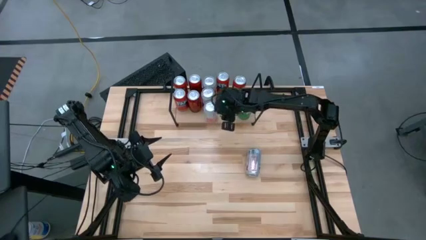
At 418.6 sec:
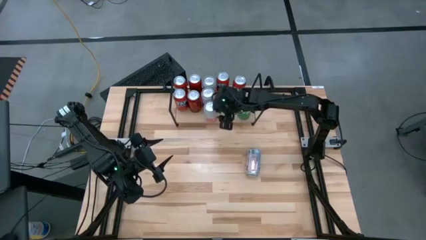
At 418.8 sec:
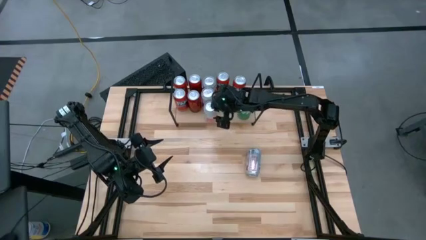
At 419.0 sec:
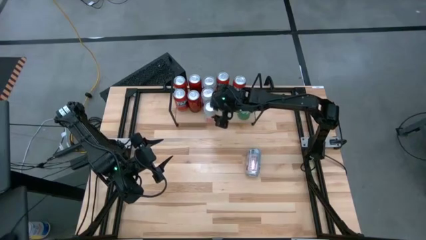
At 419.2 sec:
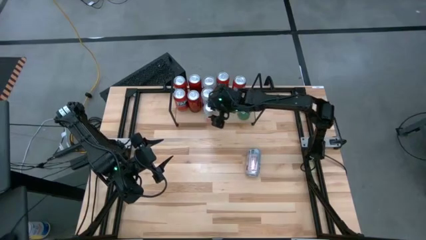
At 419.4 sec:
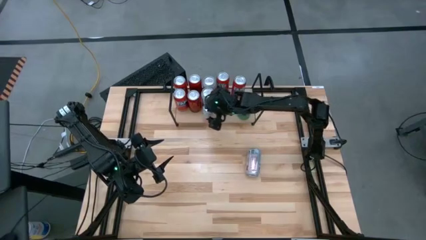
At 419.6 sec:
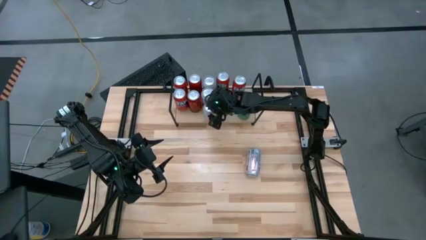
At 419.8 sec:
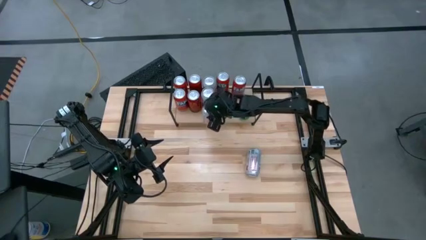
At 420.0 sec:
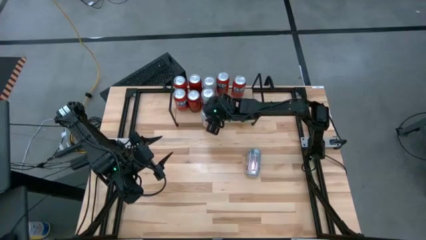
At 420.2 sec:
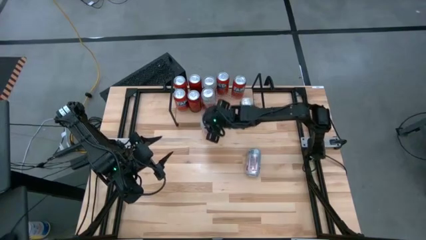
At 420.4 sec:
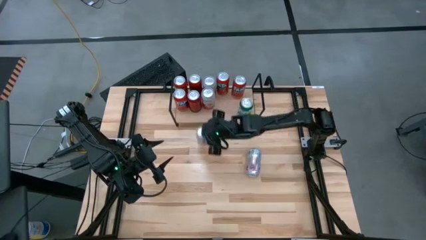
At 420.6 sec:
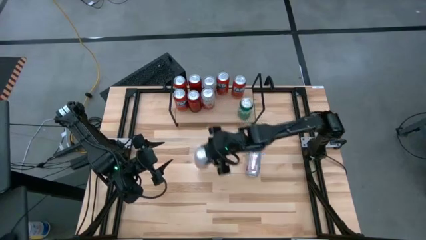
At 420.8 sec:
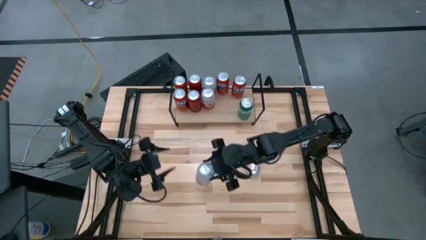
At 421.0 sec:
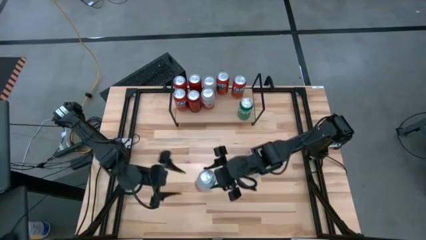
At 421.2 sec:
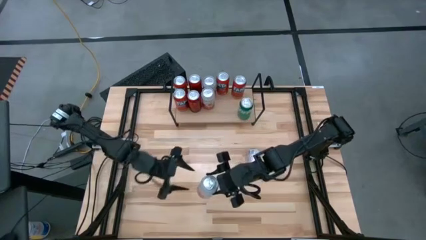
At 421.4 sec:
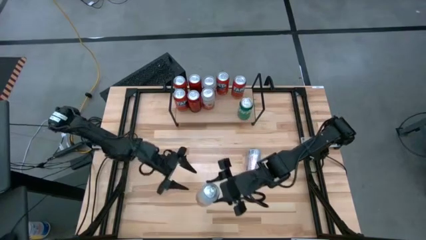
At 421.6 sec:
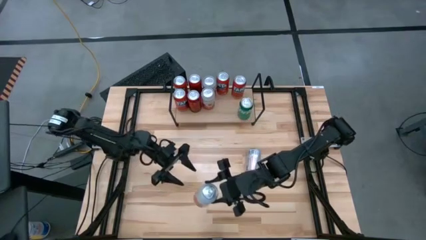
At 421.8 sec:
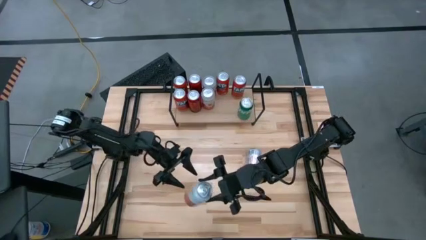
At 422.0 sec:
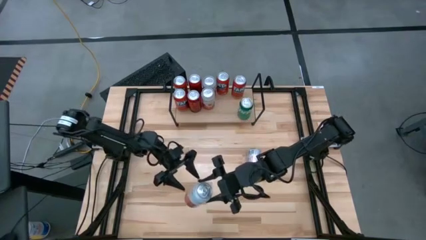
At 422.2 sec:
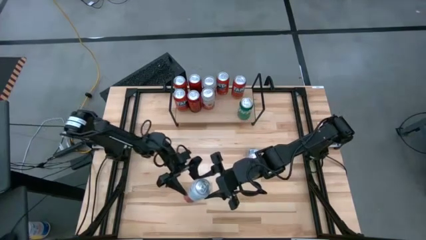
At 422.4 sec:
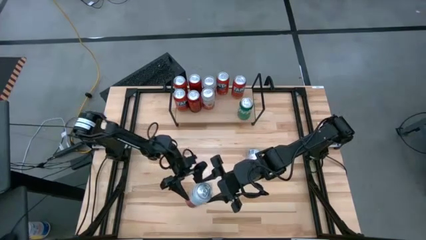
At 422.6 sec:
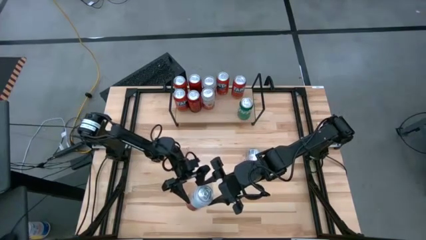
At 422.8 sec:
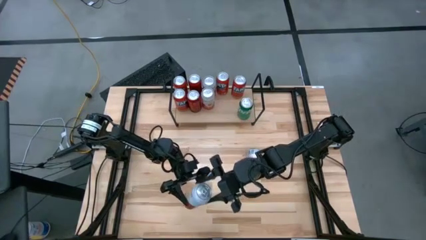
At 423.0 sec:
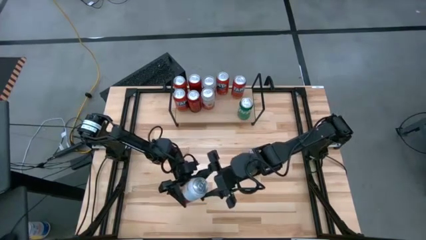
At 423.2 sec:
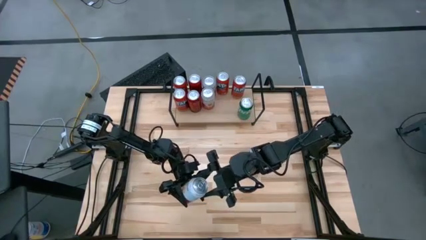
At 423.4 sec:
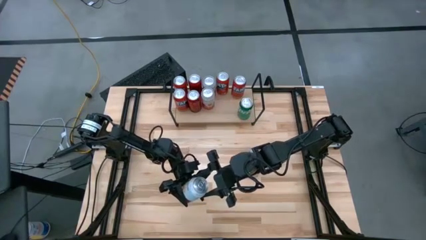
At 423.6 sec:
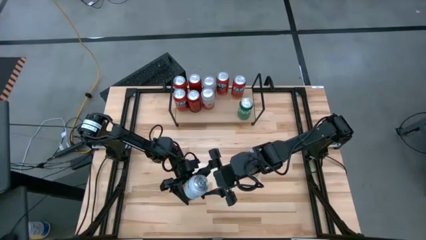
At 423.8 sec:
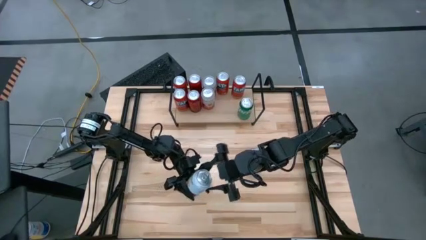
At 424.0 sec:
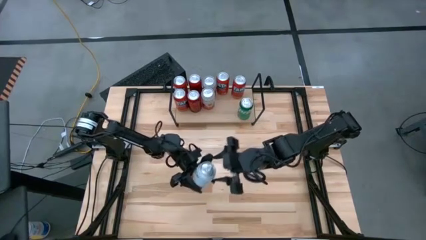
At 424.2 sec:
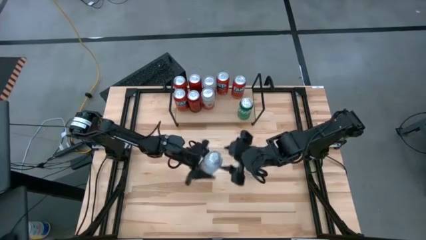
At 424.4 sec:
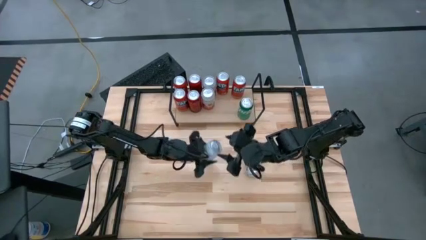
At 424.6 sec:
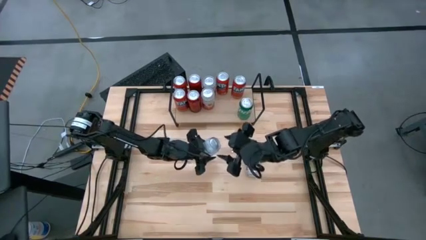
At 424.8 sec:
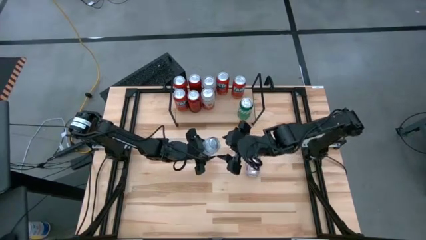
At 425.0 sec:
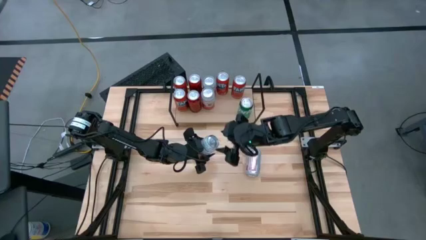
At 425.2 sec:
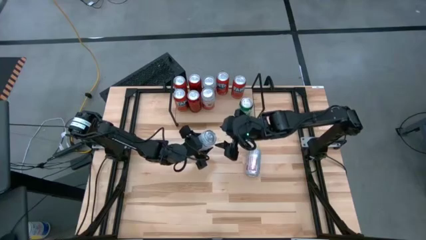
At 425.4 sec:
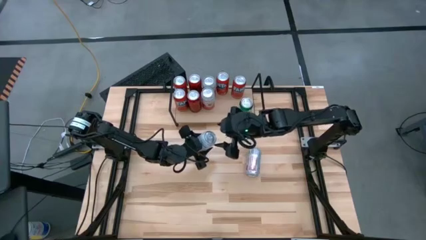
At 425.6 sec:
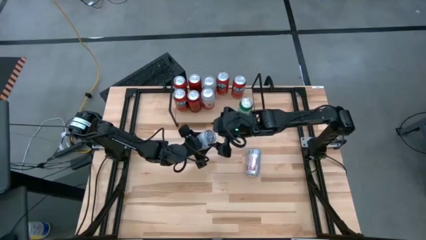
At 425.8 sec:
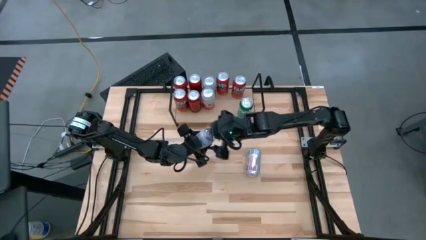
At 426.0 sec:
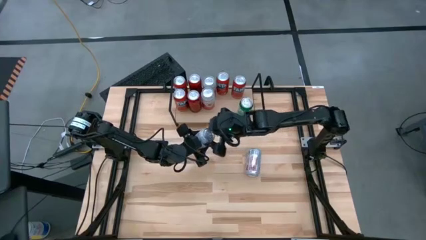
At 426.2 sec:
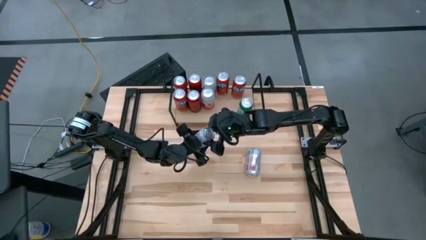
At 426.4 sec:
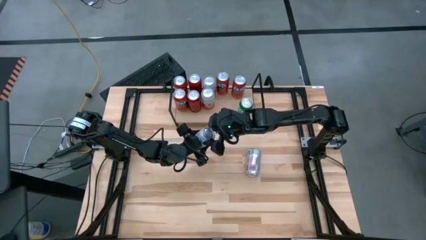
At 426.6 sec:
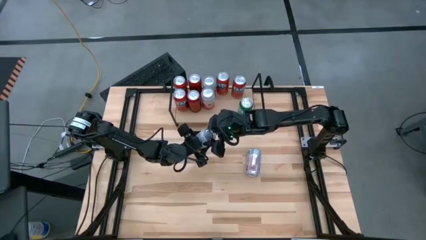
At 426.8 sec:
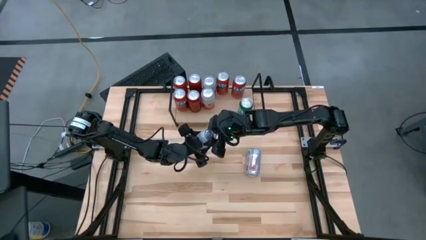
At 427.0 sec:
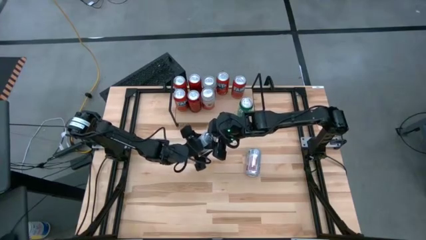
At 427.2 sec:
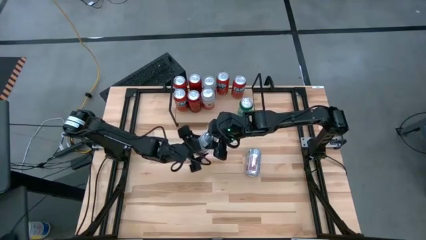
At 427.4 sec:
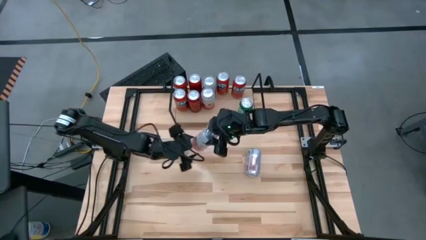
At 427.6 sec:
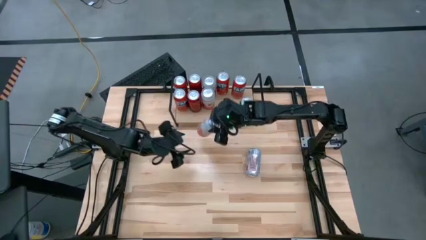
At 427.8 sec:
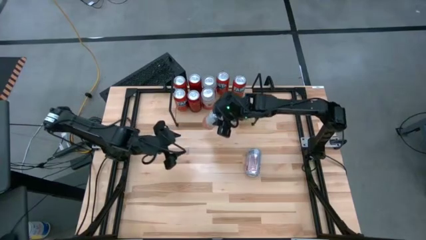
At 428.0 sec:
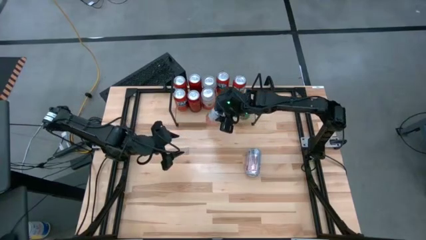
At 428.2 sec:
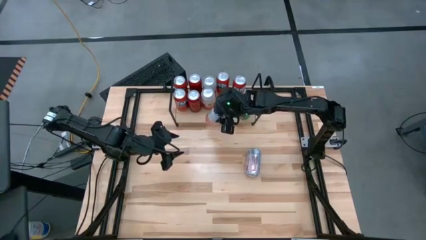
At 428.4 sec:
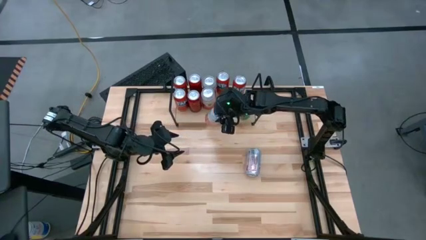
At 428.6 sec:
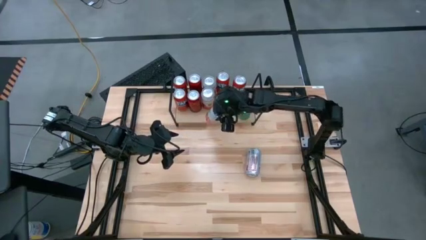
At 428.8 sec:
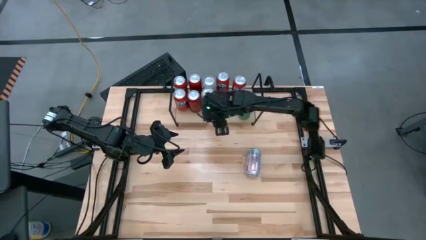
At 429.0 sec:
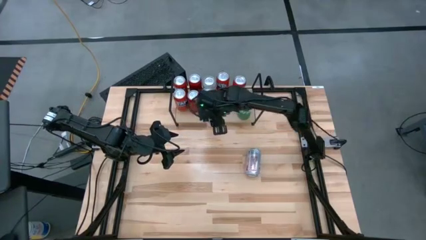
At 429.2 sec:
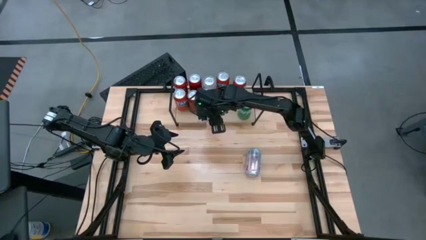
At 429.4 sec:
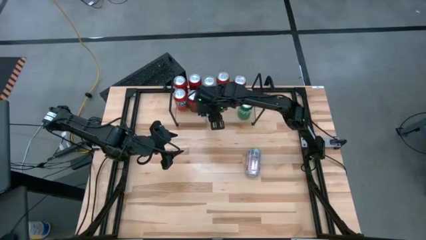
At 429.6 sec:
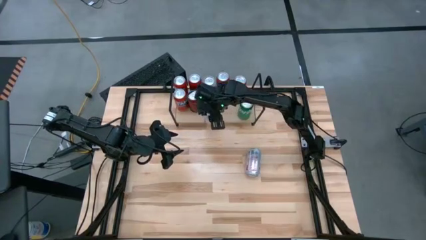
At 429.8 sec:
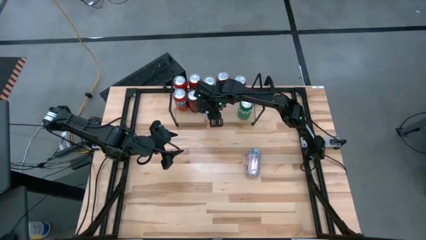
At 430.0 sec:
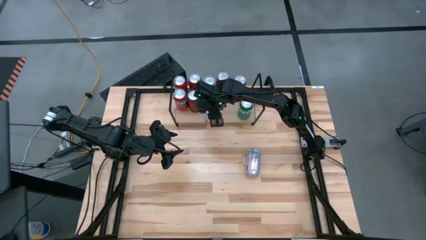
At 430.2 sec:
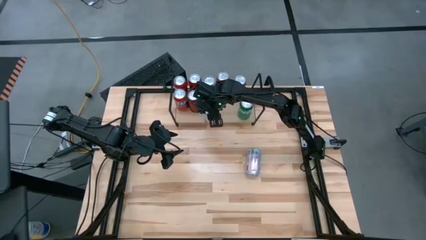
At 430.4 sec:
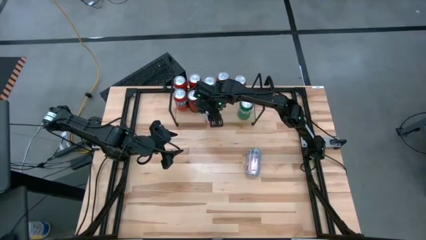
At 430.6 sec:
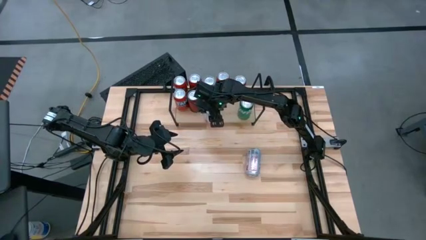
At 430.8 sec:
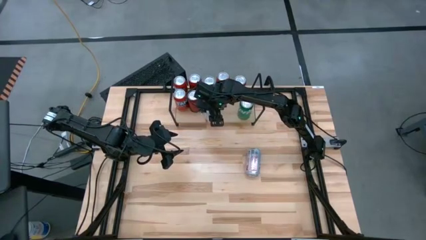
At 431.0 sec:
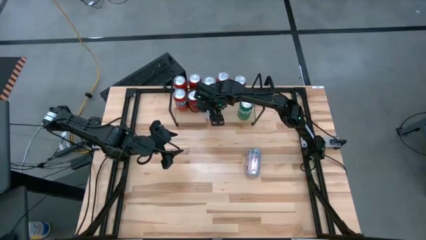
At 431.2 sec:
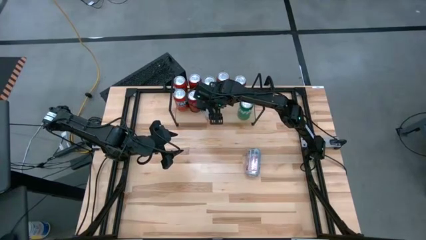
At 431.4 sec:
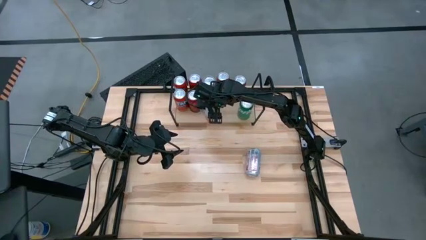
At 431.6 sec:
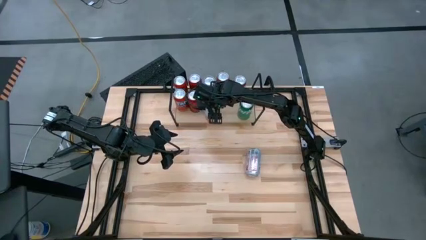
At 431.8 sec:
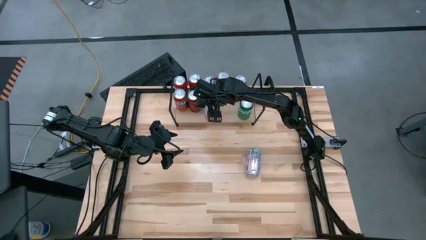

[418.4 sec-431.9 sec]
Task: Place canned beverage on shelf
Adjust the orange white soda can on the shelf

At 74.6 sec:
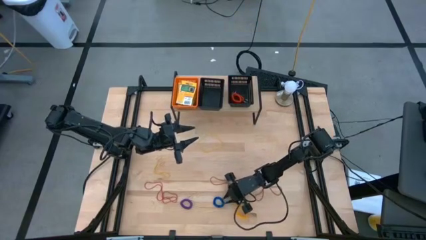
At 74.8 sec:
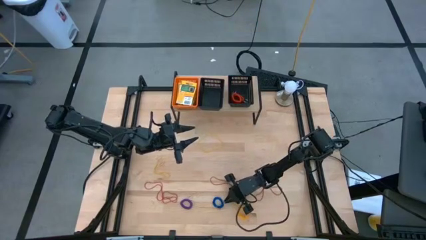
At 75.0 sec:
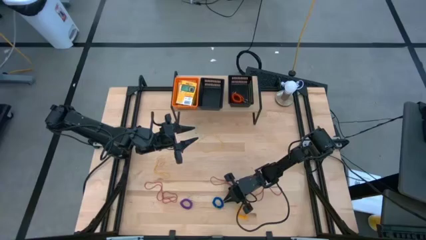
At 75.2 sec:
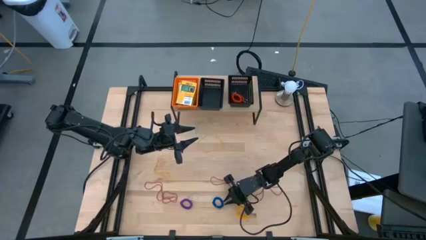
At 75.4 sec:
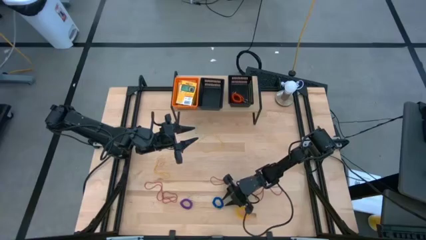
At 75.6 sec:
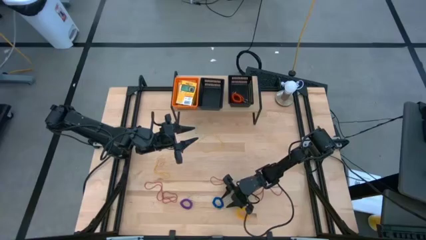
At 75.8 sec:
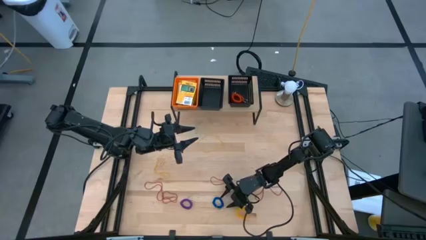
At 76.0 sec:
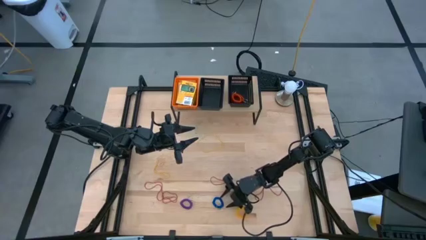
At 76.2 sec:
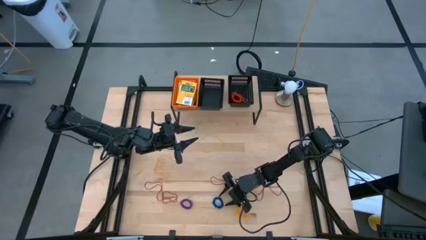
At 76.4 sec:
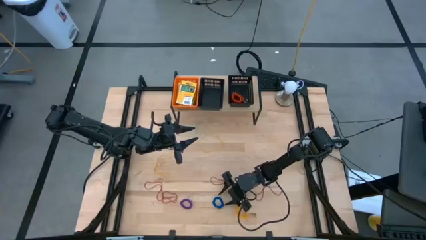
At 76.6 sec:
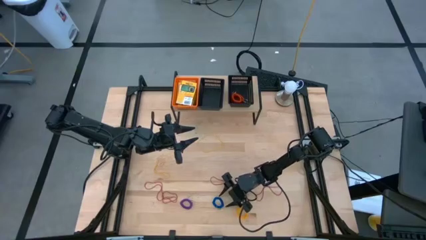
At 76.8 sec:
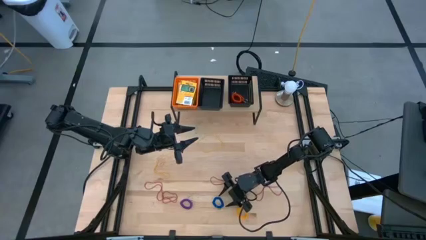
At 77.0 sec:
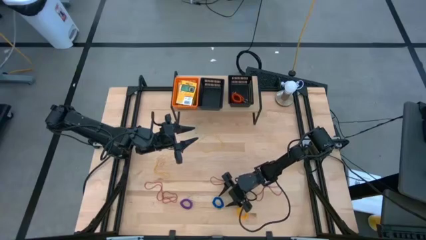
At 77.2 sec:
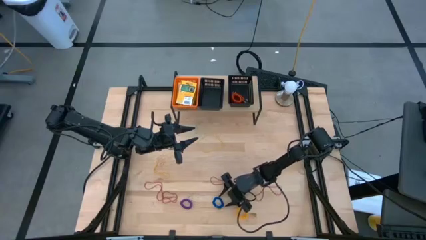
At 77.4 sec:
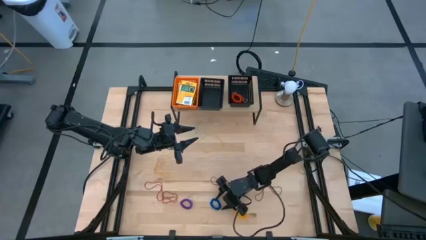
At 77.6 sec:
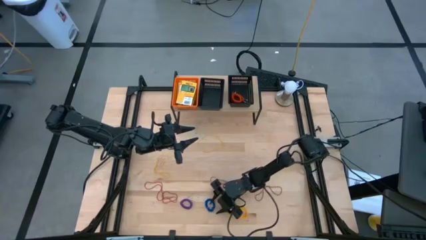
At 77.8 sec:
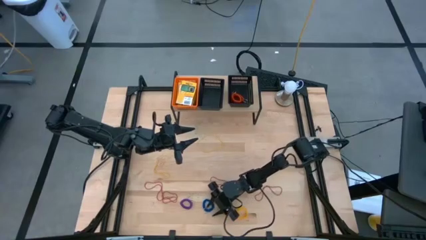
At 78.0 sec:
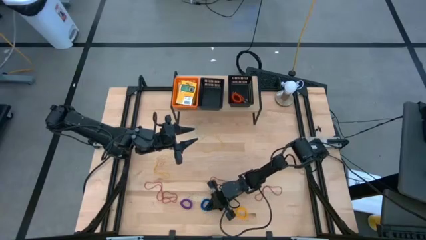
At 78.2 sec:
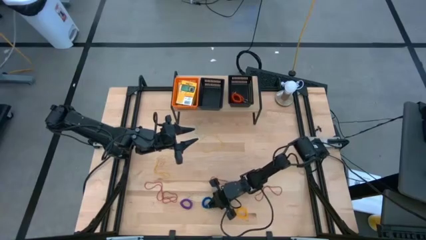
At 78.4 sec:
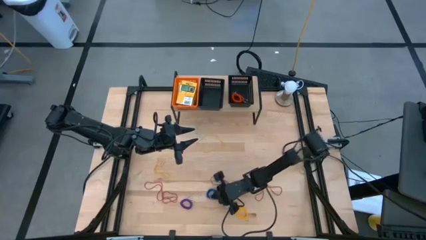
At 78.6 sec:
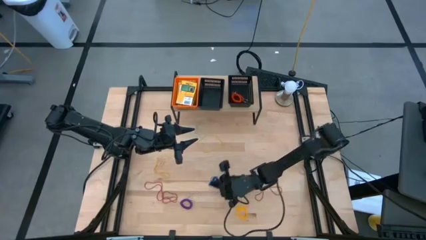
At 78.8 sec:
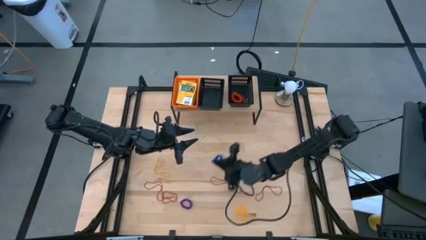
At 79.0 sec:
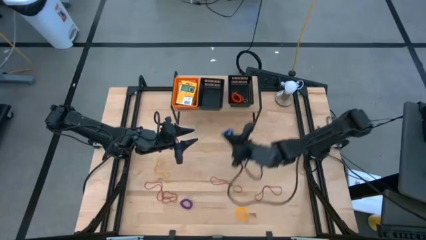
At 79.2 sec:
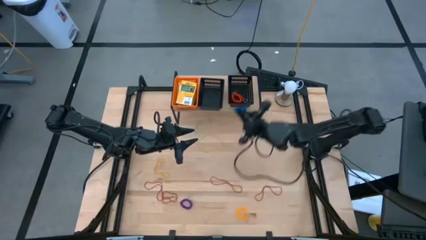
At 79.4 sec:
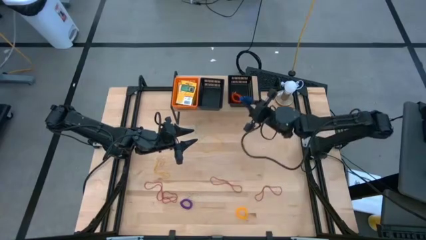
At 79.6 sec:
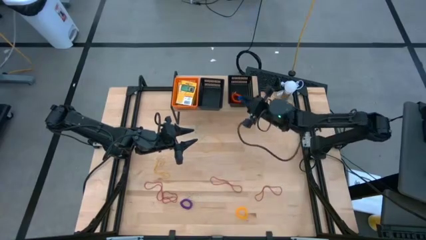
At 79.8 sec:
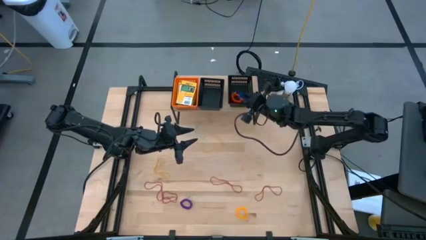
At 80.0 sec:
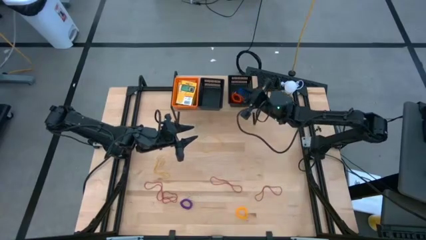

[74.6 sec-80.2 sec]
Task: Pick & Place Office Desk Supplies
Put the blue spring keychain into the right black bin on the shelf
